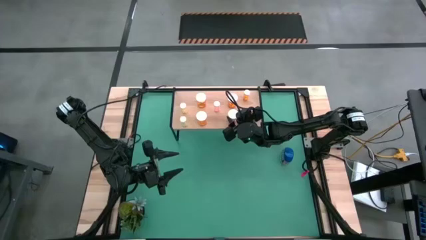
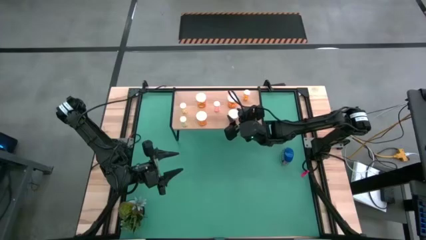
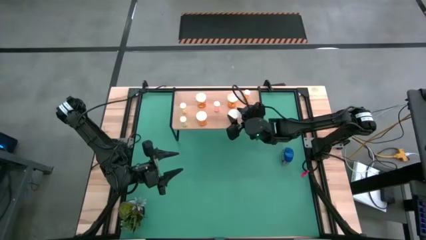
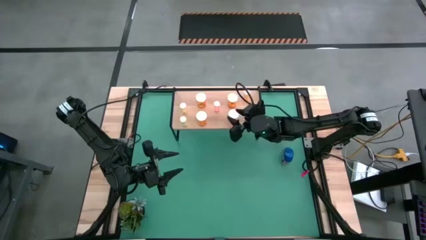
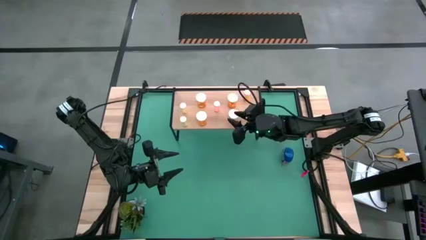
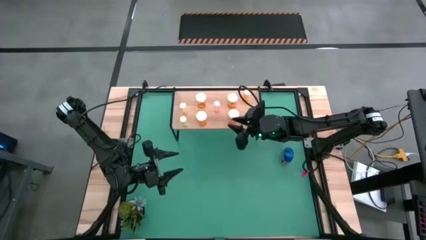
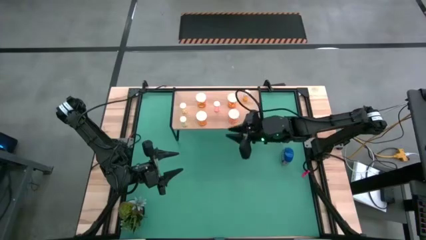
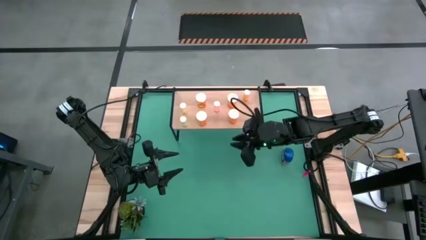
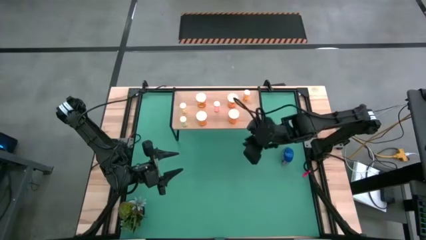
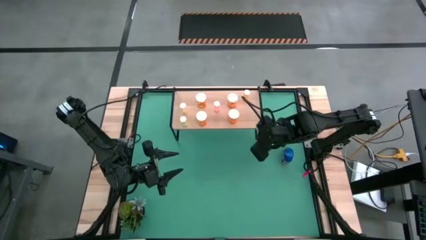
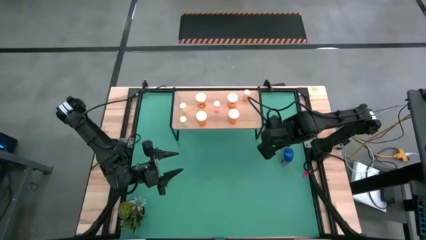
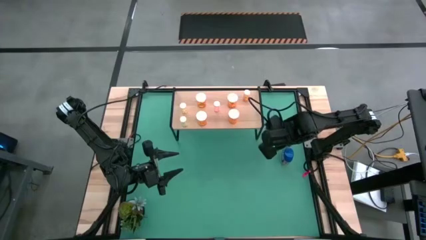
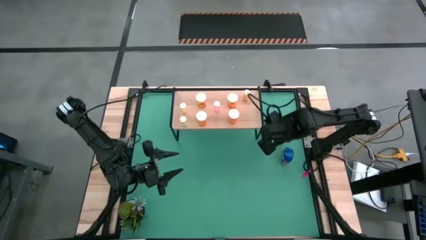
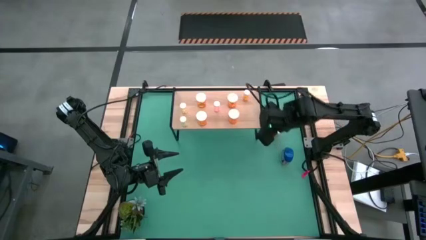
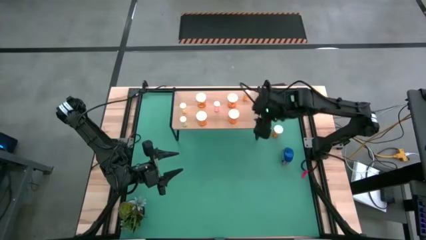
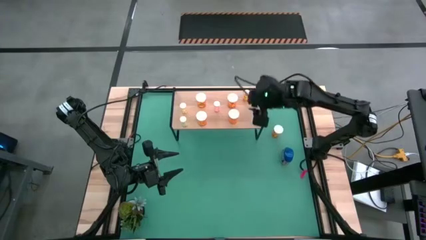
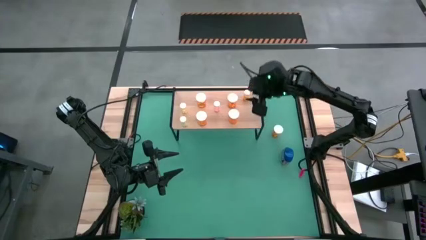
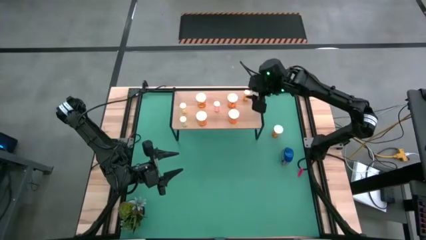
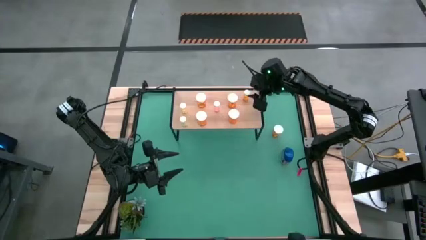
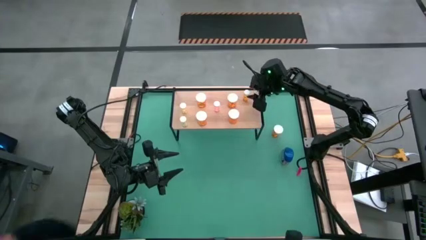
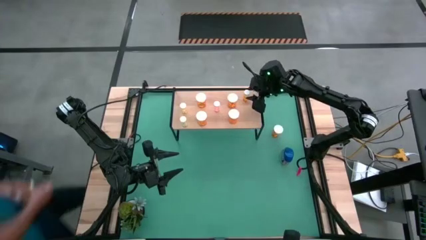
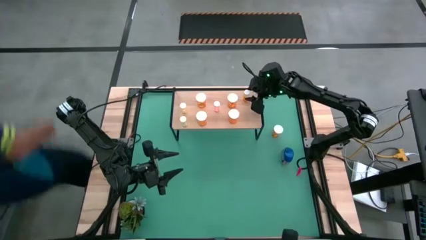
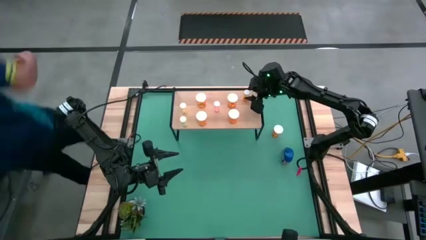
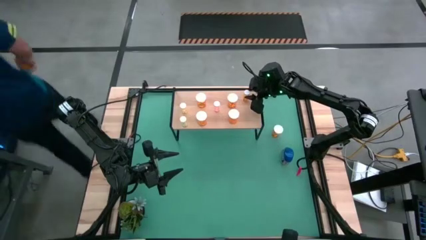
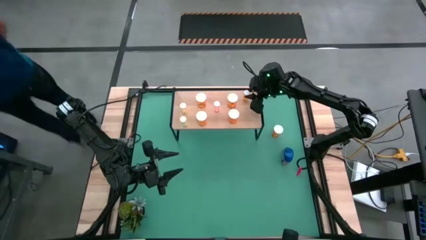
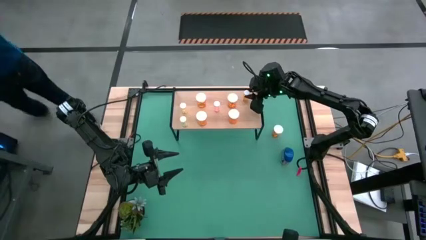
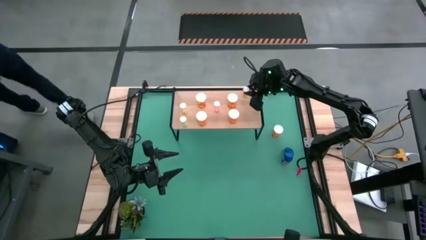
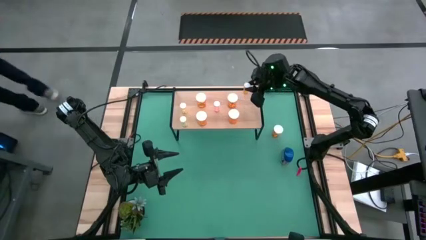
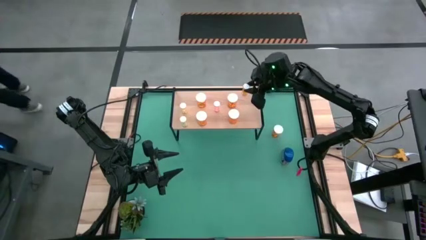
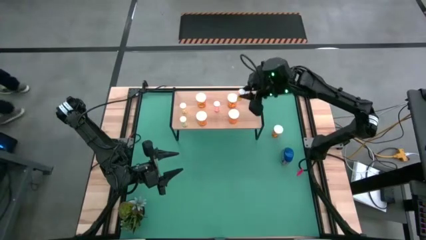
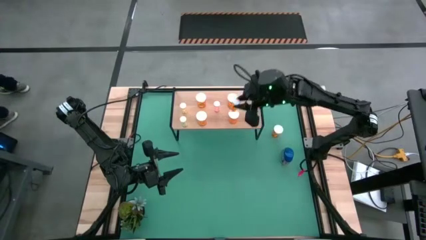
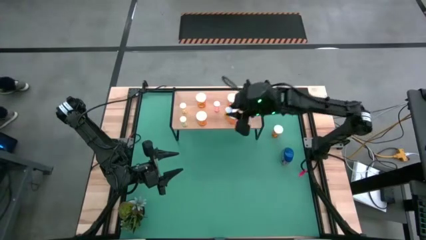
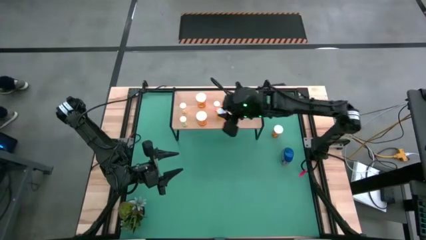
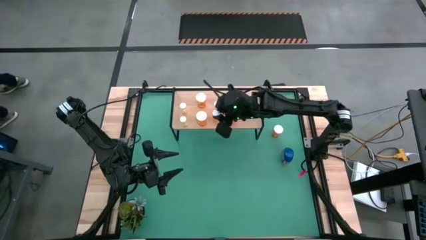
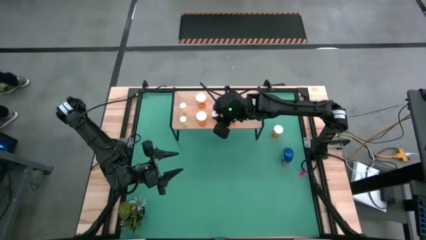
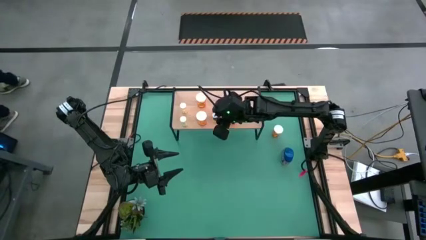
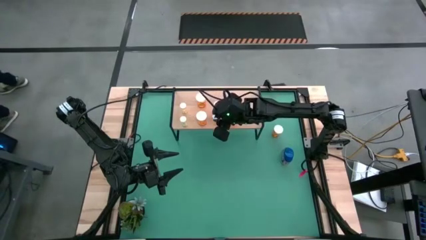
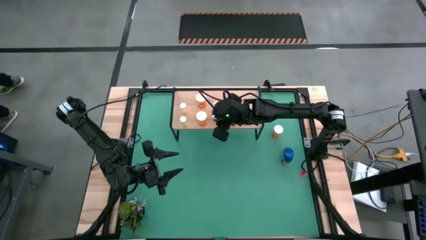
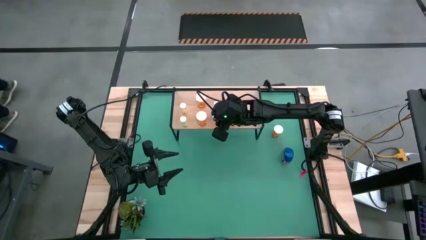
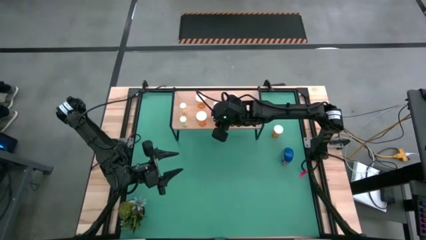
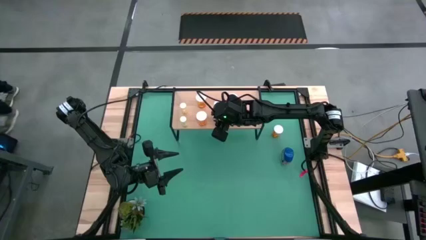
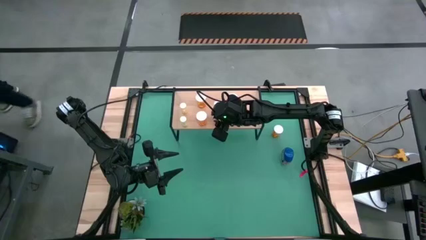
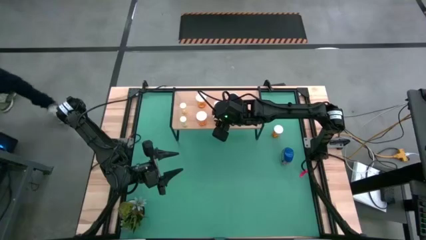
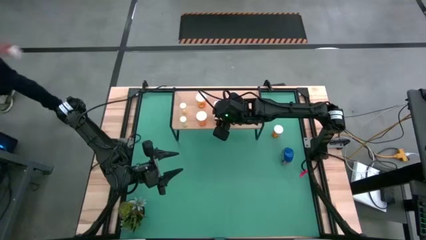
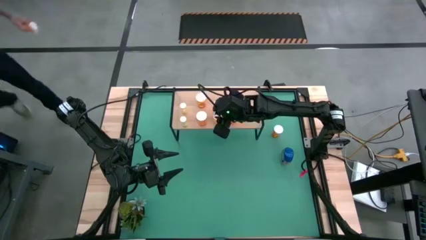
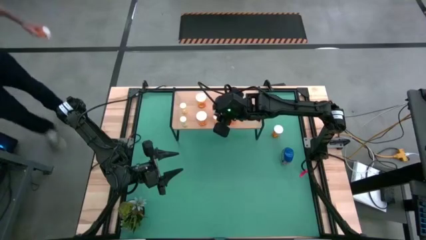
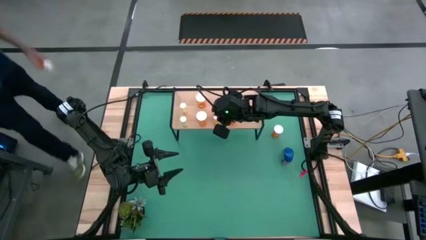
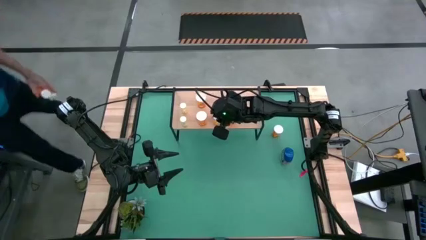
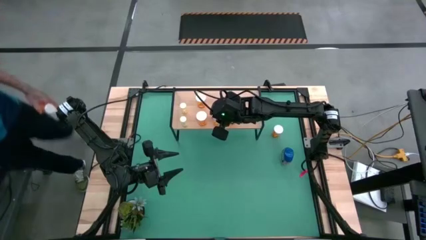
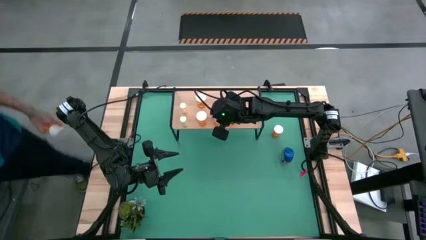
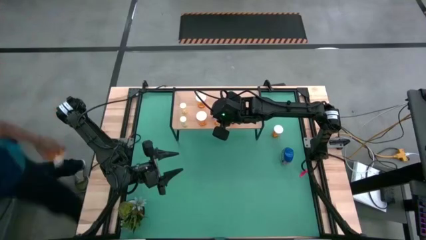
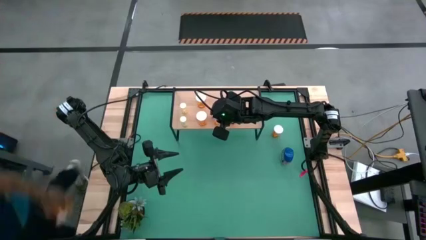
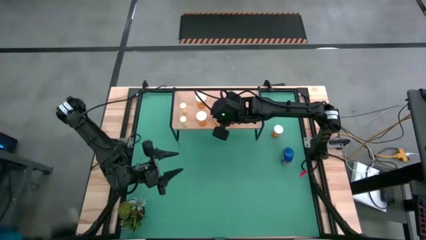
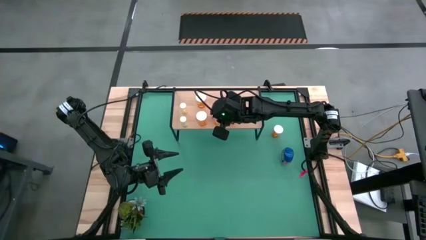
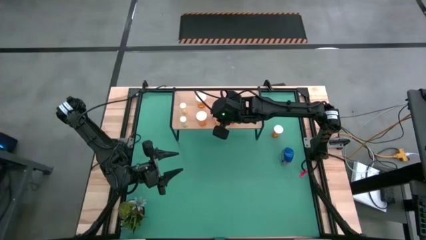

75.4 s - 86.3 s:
Task: Pick and place medicine bottles onto shelf by color
Move the small orange pill bottle to the middle of the shelf

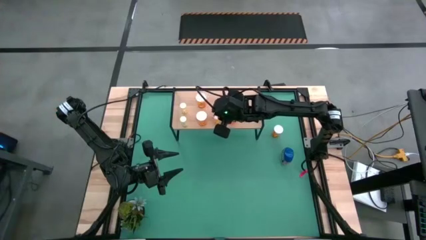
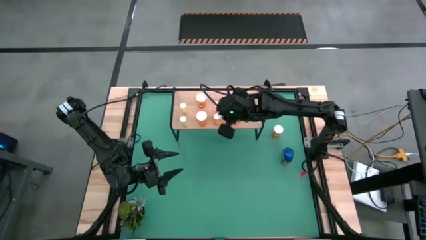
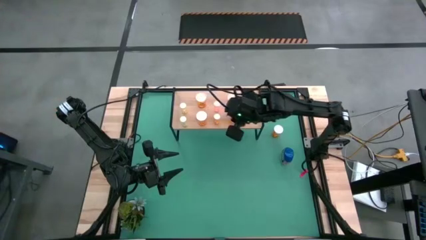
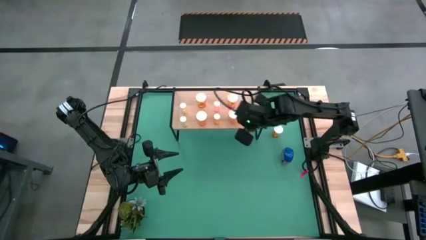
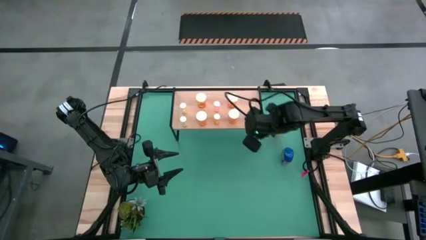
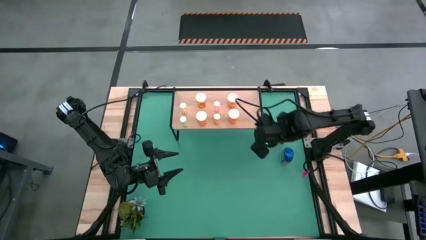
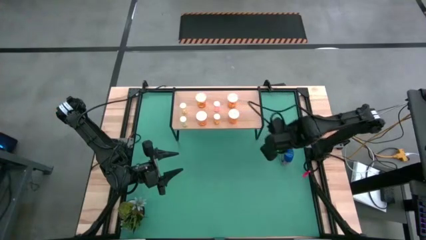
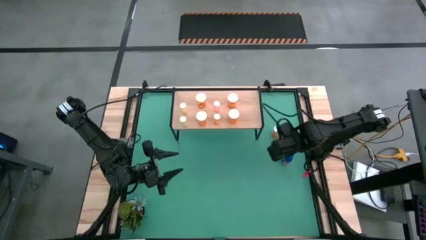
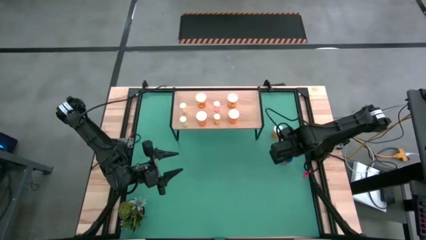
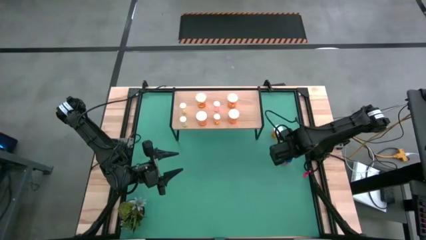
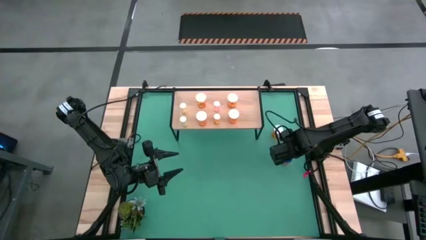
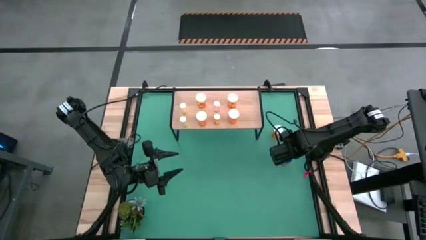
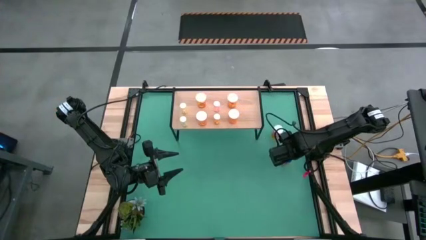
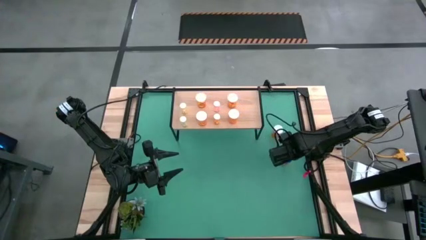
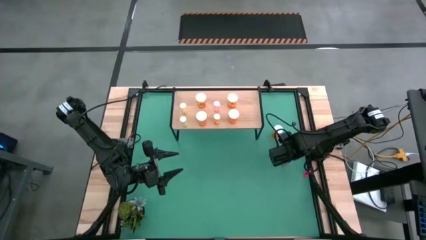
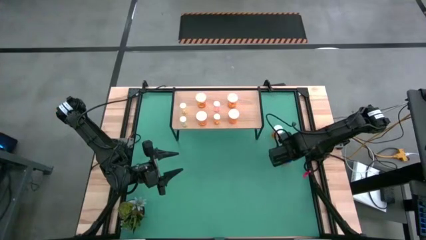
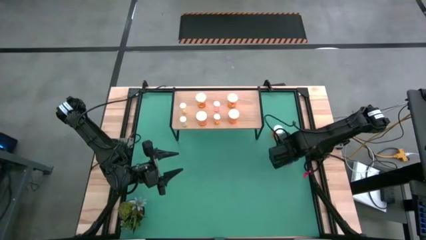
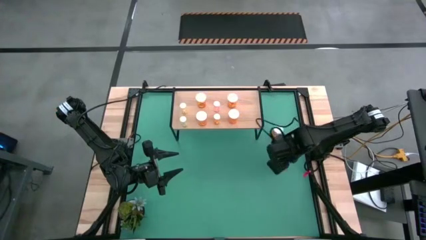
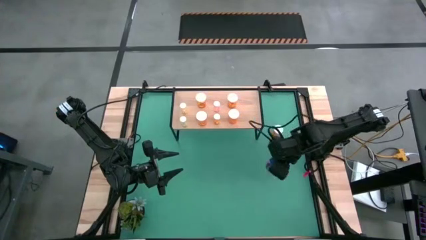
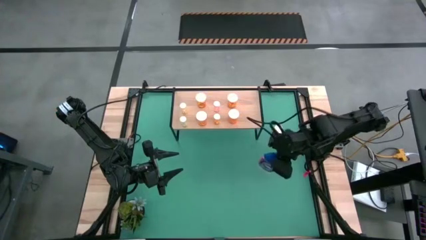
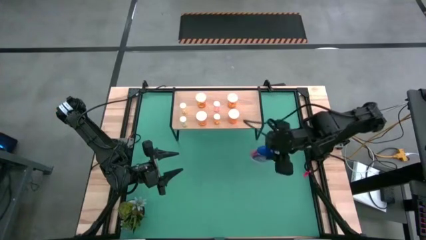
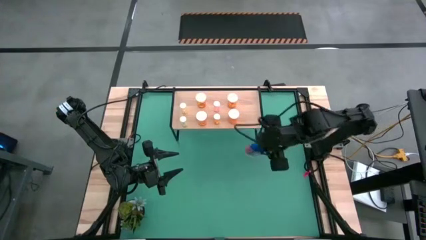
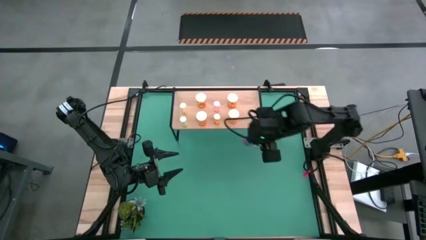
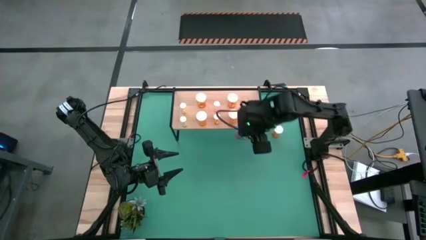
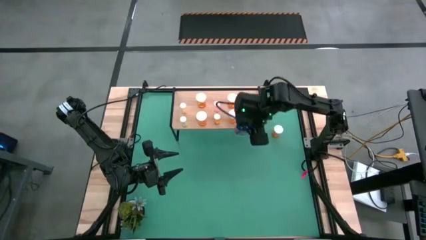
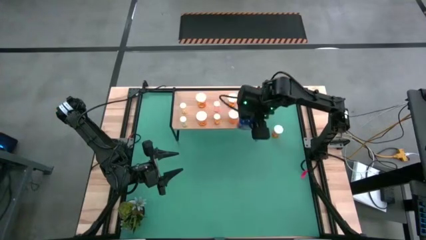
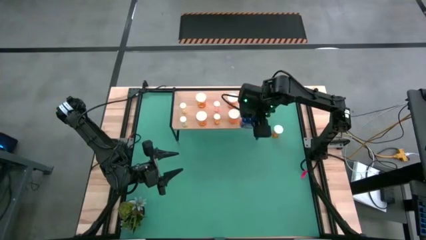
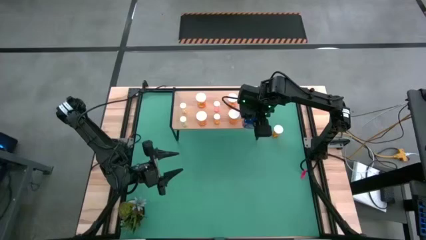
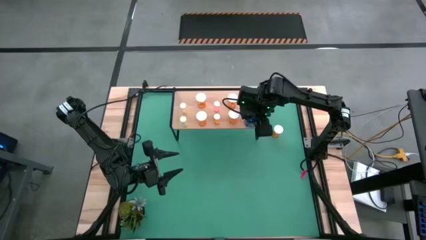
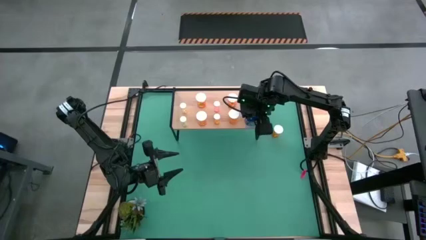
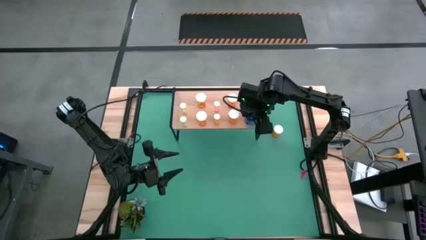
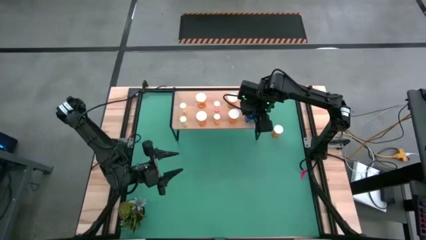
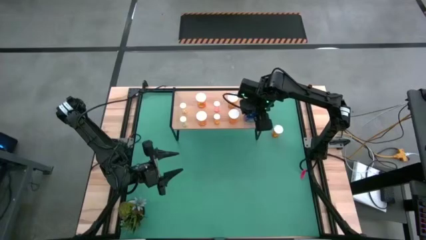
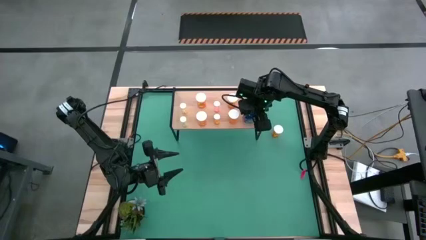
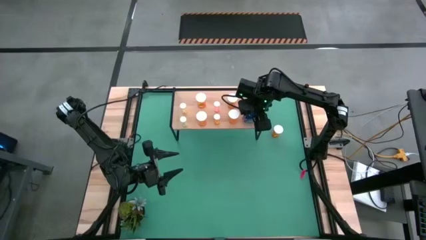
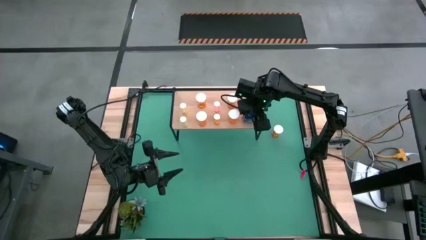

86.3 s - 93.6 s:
Put the blue pill bottle beside the big orange pill bottle on the shelf
